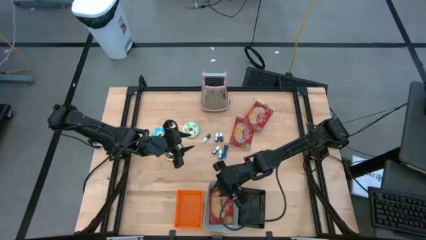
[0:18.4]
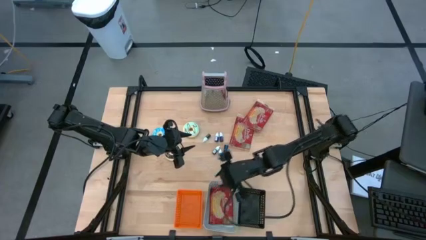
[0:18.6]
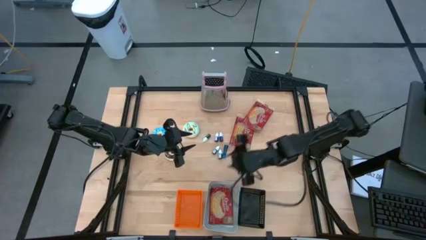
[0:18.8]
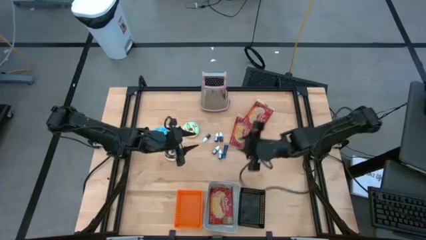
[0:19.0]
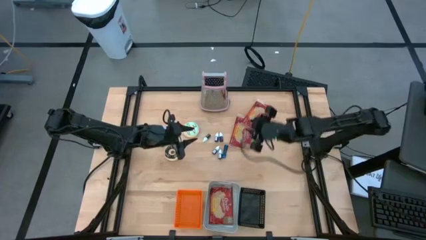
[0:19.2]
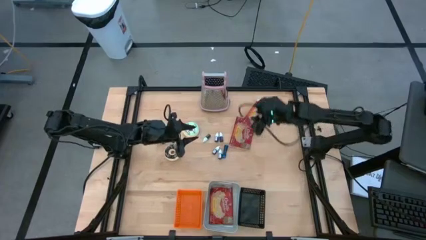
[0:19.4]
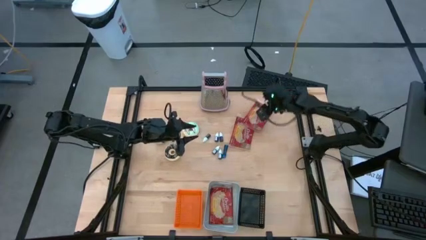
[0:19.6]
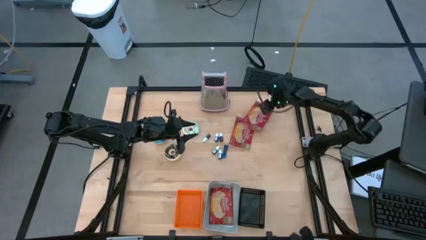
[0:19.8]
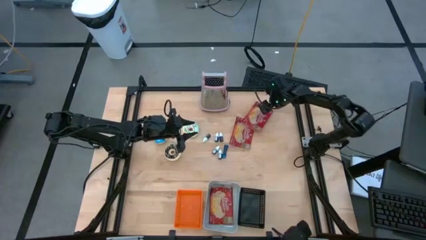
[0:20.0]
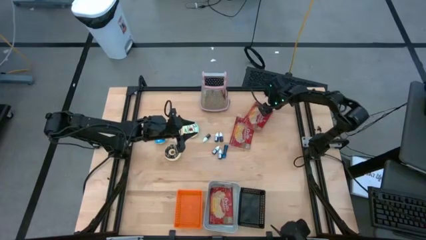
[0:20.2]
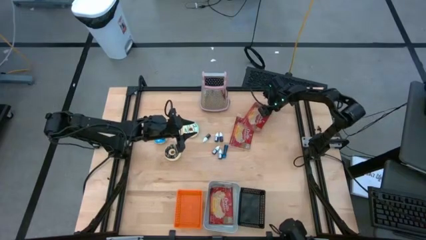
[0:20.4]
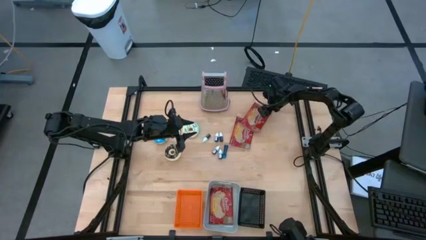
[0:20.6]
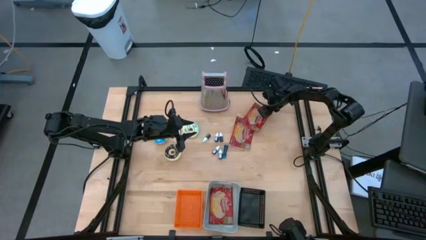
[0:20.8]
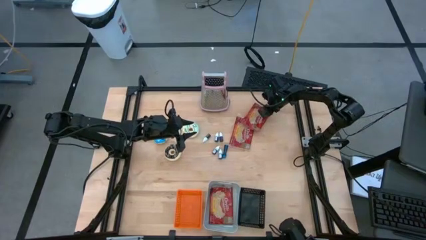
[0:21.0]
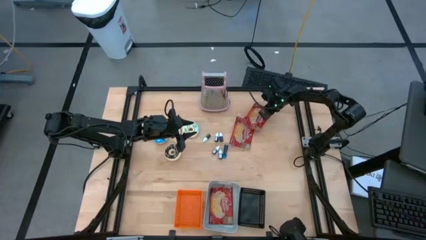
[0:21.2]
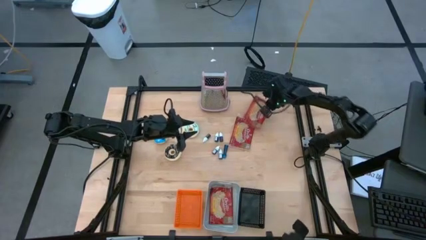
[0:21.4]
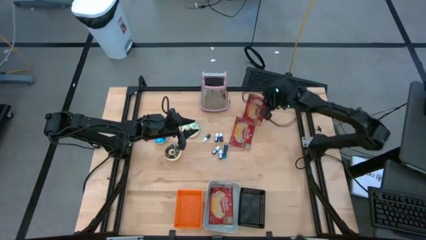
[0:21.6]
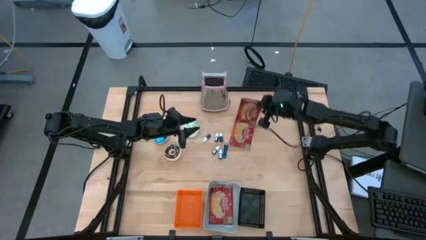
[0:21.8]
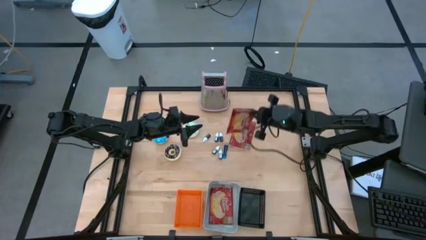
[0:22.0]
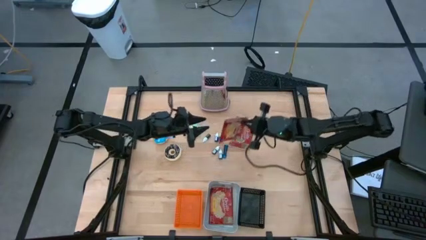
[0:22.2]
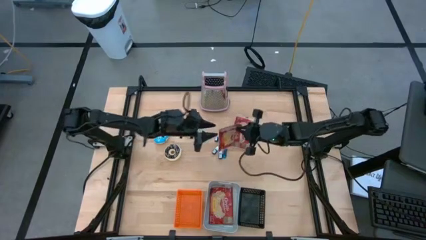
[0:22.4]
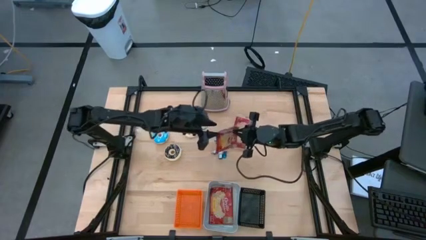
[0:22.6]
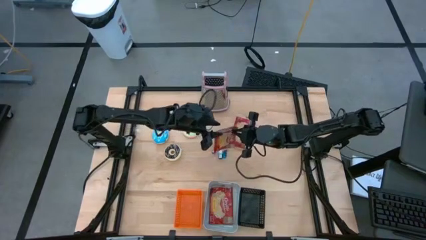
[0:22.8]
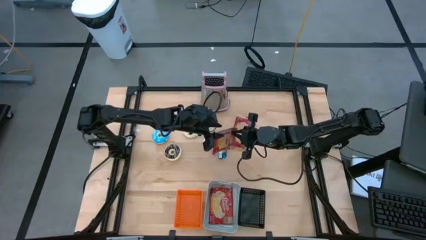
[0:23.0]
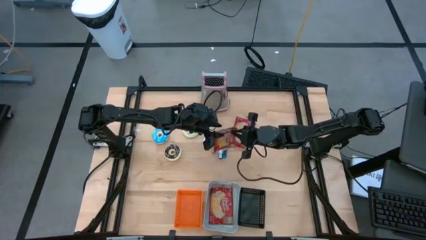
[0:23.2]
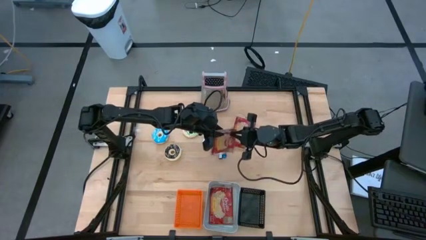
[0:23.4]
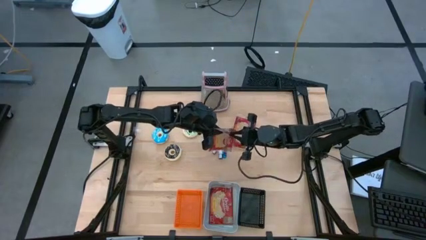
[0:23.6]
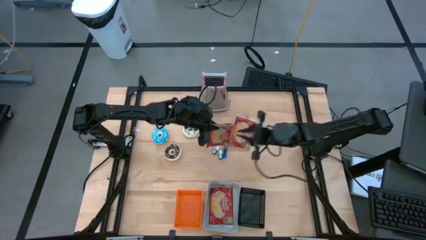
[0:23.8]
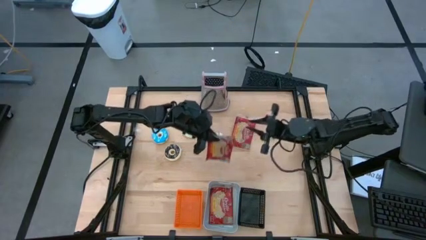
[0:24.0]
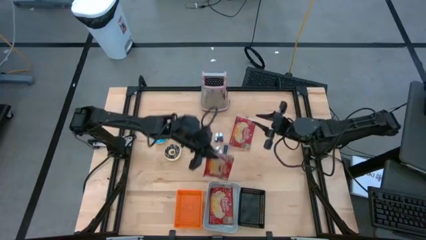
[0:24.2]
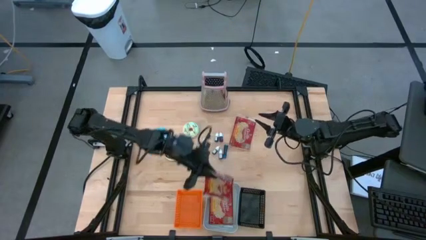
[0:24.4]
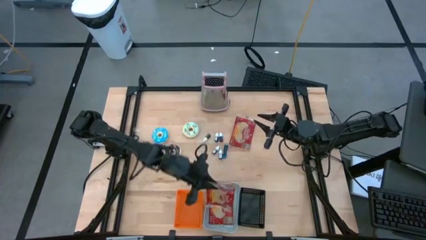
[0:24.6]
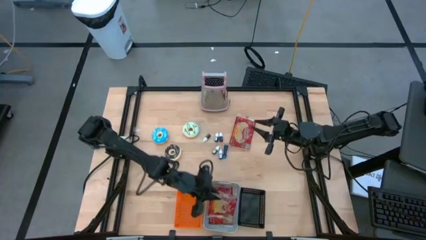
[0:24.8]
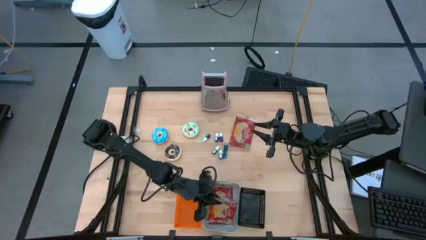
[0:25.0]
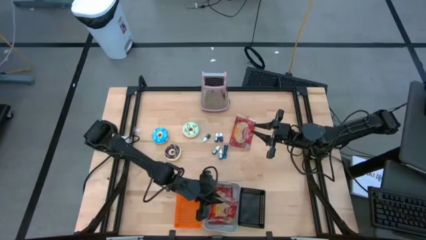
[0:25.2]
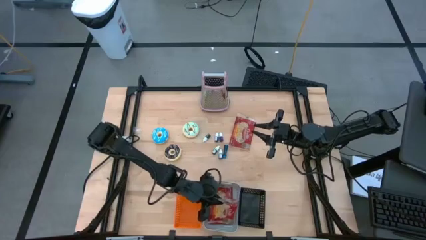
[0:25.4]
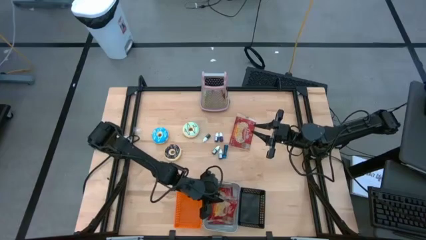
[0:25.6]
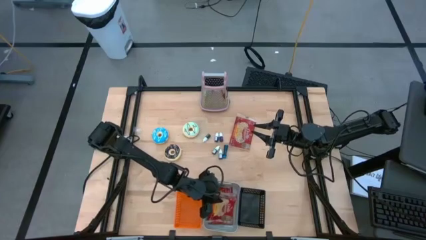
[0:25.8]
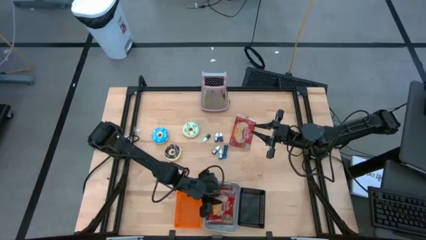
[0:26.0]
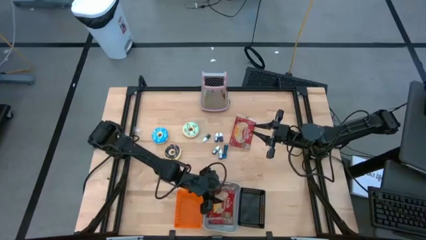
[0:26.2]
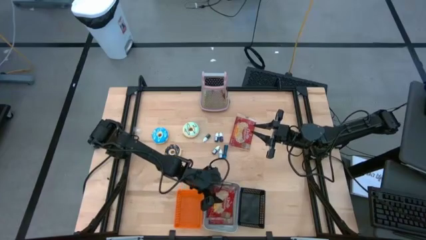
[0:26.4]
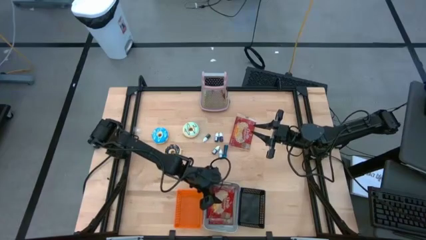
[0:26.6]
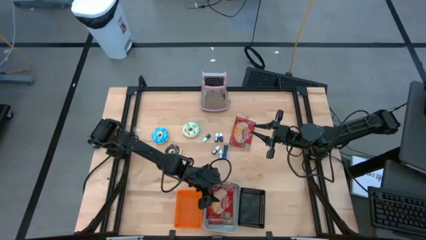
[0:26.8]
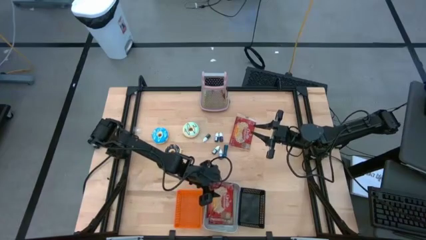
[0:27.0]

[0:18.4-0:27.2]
Put the top red popcorn bag into the gray bin

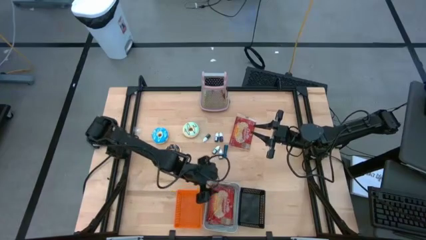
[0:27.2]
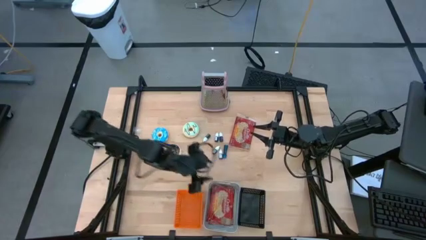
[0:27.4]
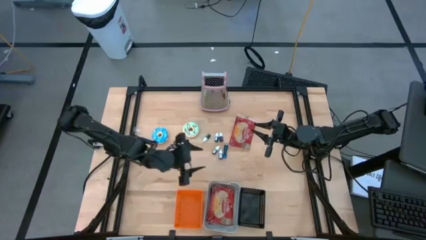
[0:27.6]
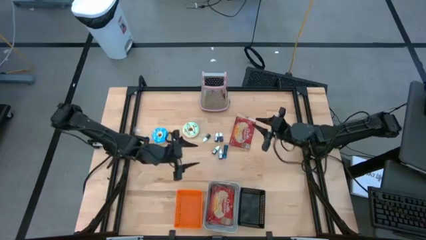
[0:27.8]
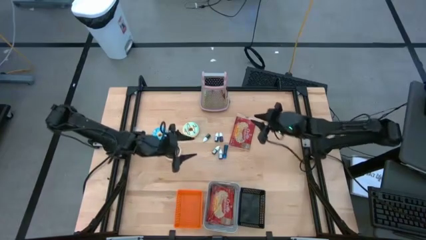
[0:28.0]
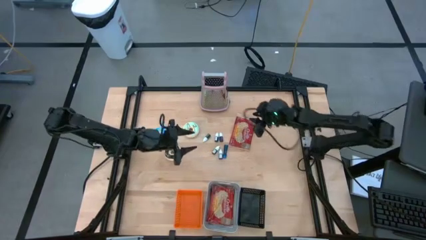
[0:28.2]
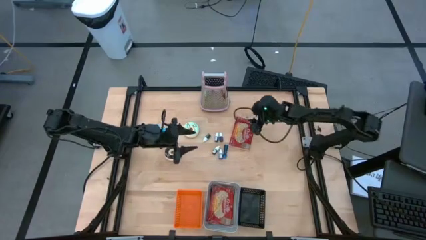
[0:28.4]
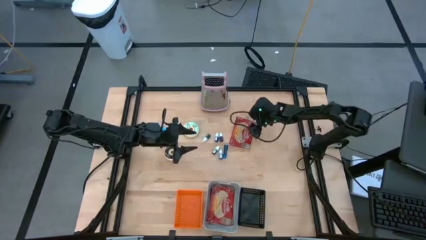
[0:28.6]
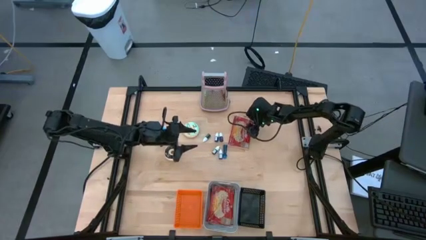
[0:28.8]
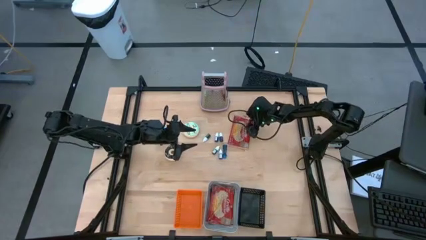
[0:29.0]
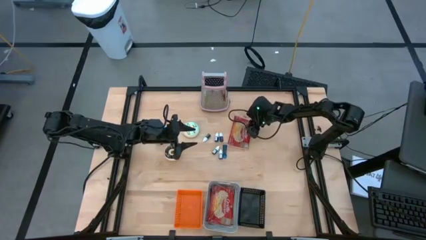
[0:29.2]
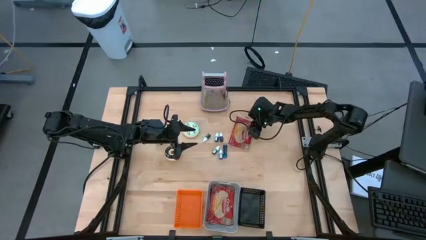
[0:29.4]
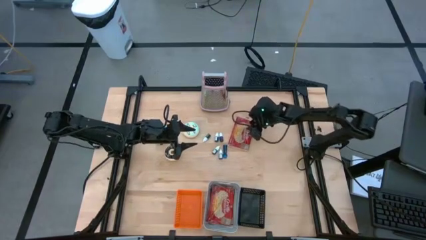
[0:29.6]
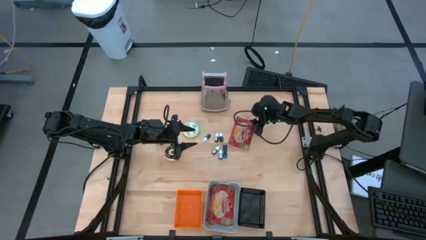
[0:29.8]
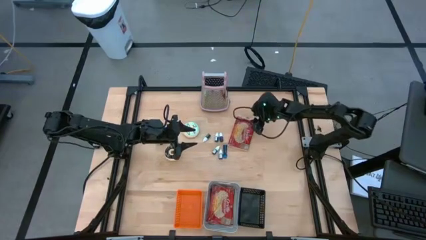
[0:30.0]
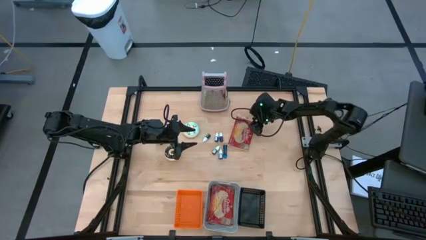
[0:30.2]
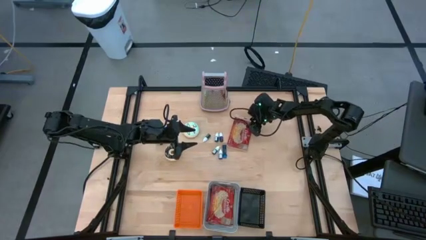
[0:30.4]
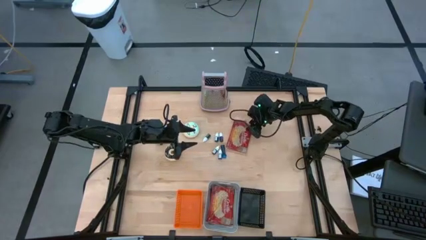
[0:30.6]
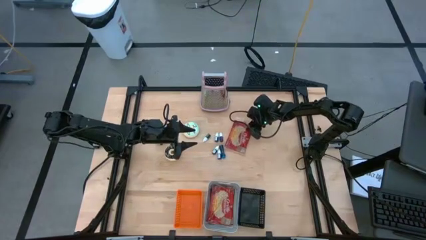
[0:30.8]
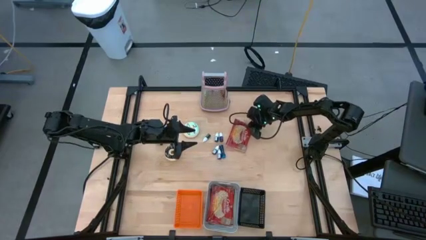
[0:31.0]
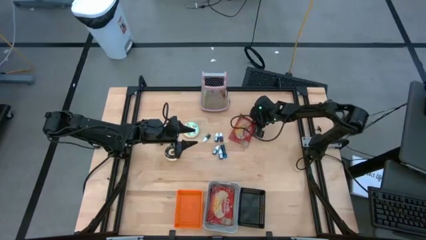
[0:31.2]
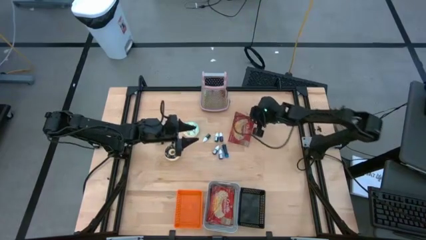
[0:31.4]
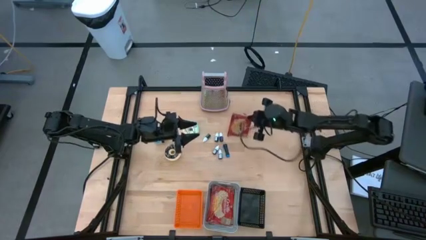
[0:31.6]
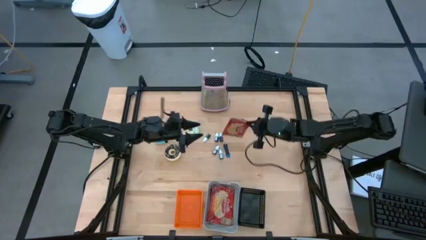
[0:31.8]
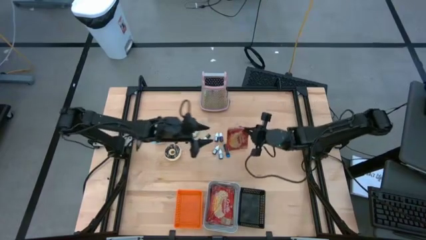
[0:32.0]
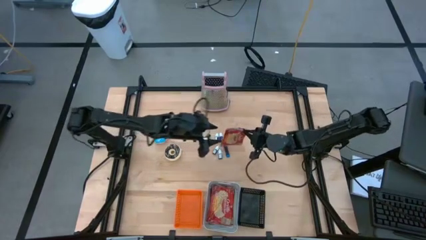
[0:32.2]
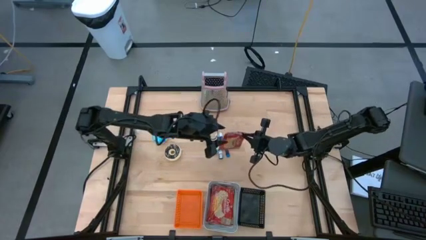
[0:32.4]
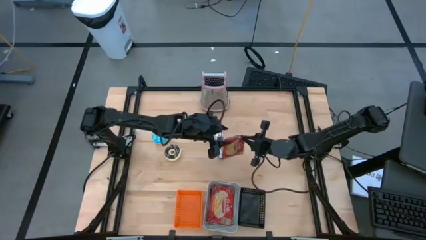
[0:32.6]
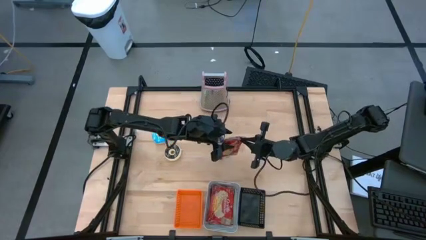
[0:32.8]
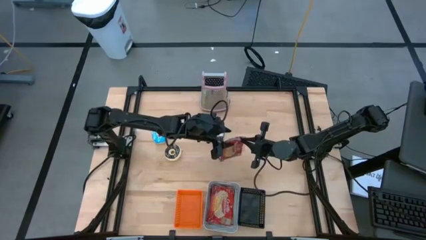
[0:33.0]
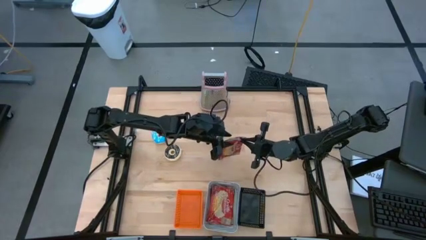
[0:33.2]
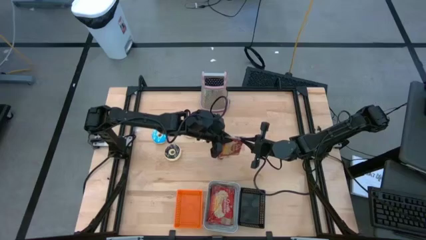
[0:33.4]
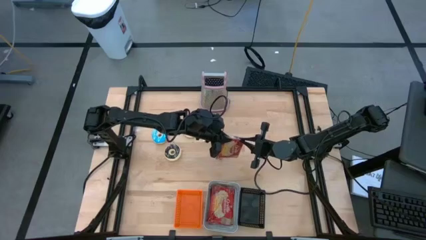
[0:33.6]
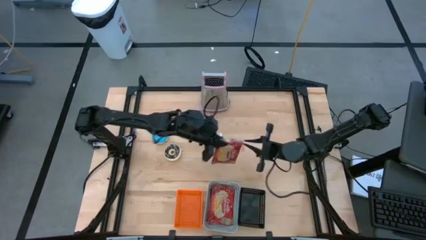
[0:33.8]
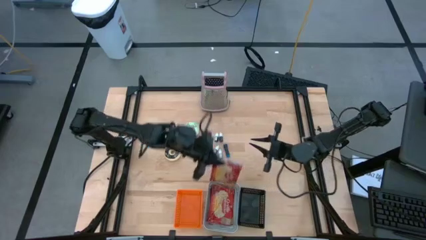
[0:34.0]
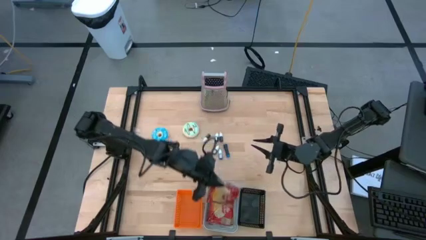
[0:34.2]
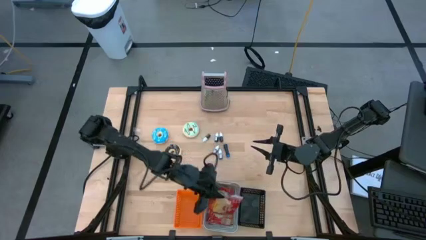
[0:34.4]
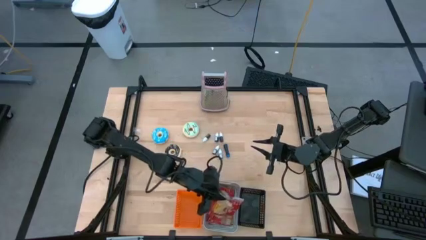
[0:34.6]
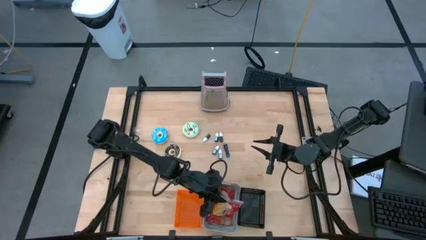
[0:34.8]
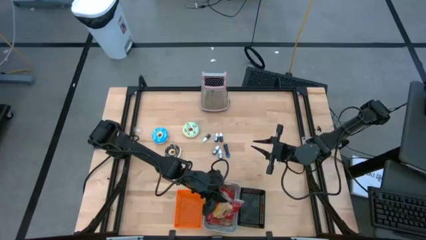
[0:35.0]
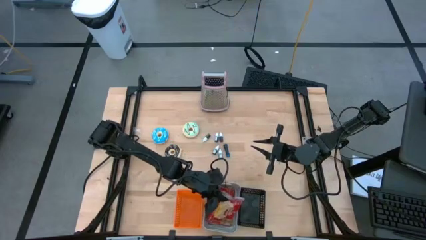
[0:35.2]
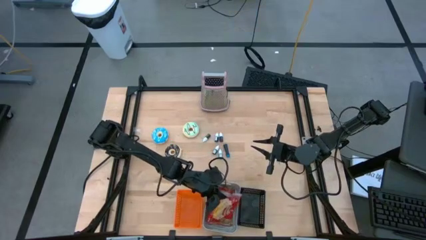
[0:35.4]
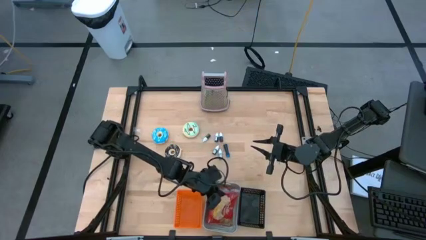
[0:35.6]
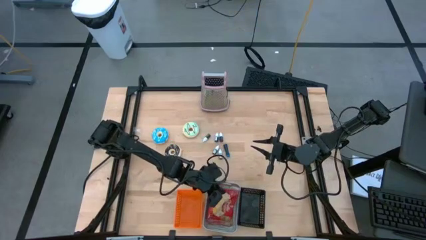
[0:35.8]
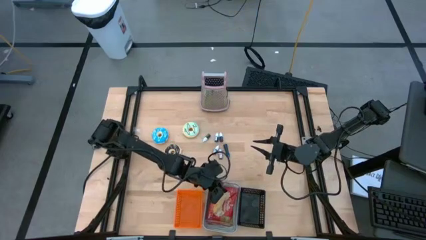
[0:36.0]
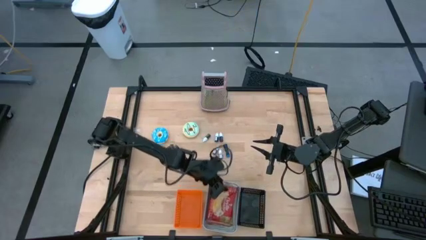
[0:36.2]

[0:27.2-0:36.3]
Put the red popcorn bag into the gray bin
